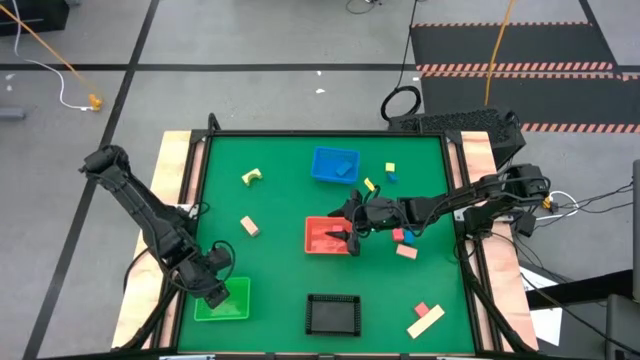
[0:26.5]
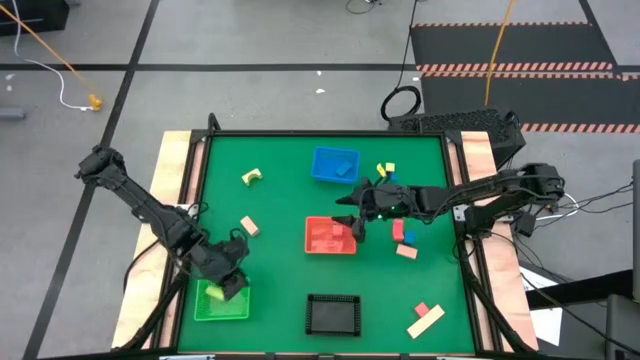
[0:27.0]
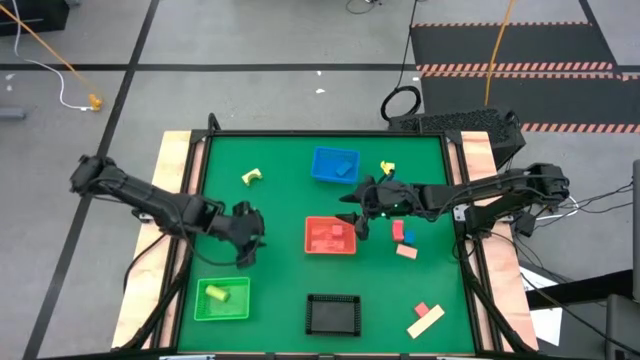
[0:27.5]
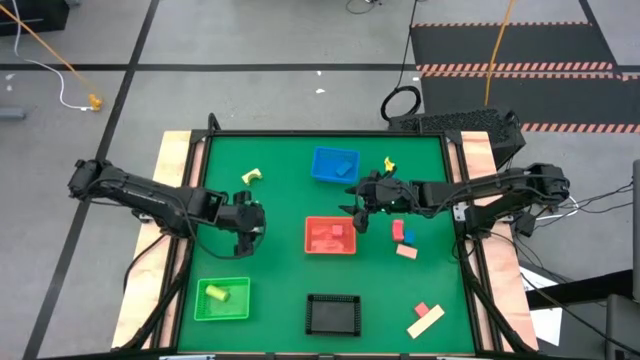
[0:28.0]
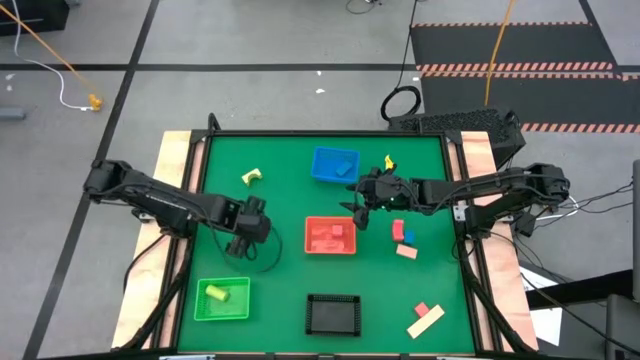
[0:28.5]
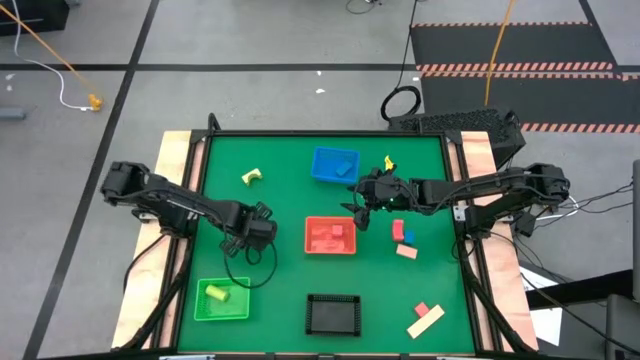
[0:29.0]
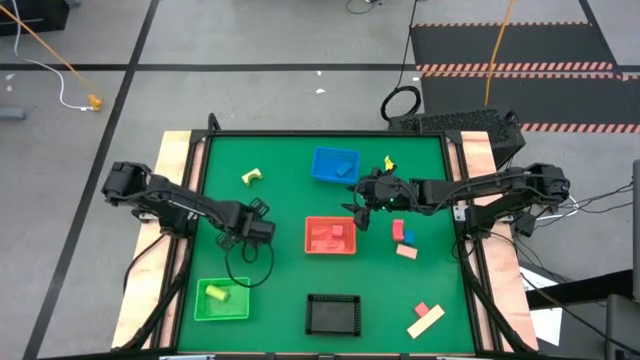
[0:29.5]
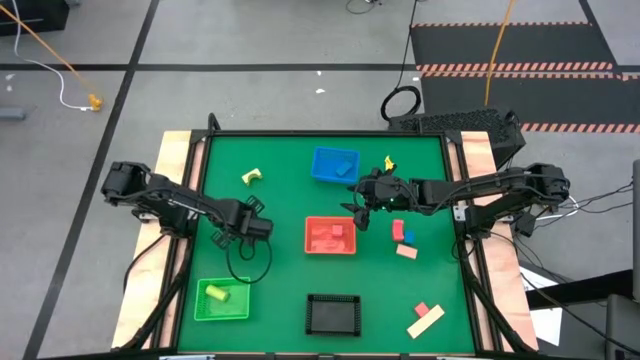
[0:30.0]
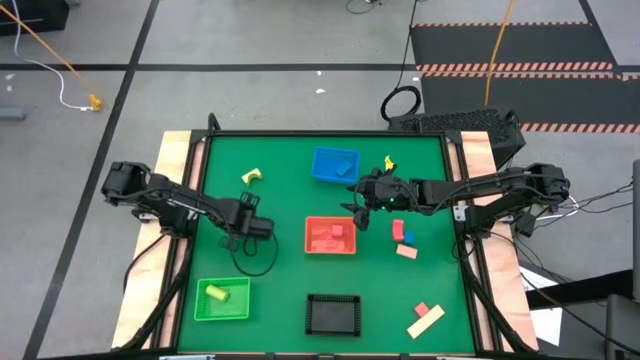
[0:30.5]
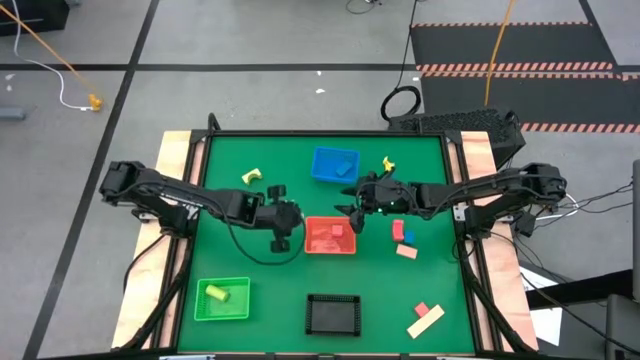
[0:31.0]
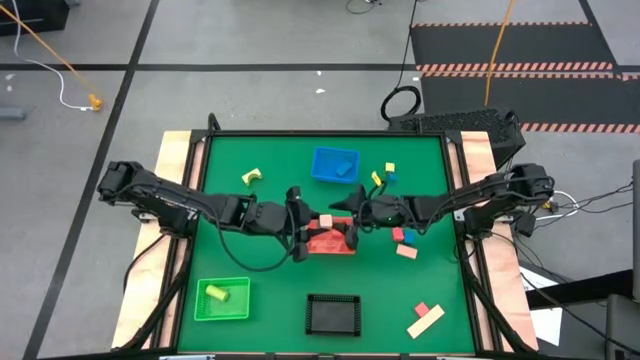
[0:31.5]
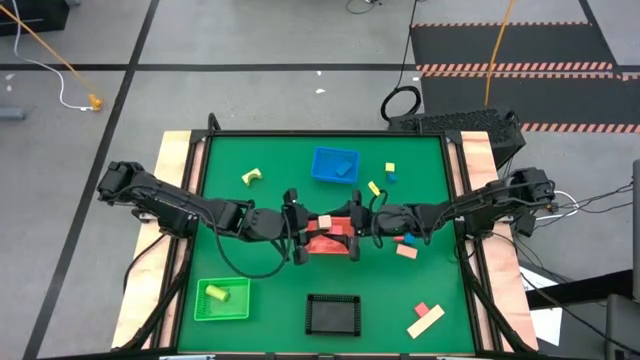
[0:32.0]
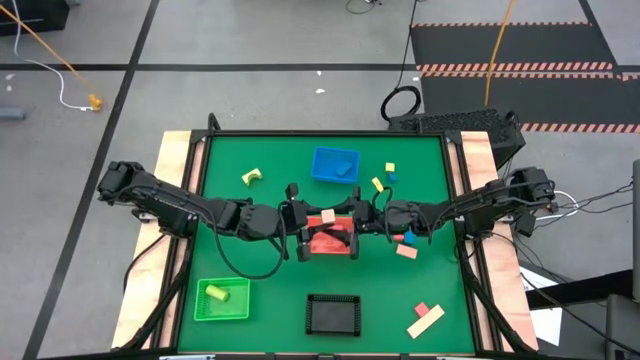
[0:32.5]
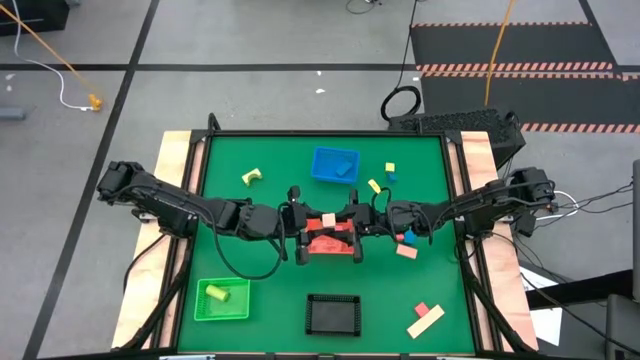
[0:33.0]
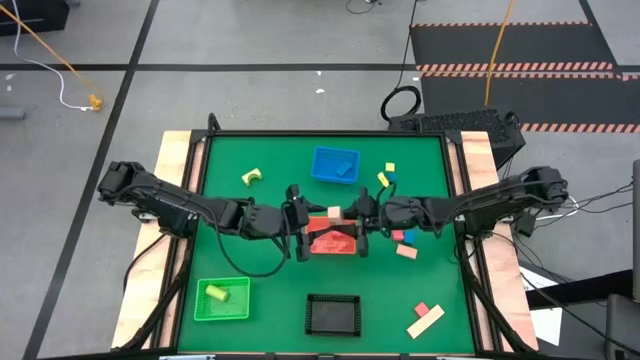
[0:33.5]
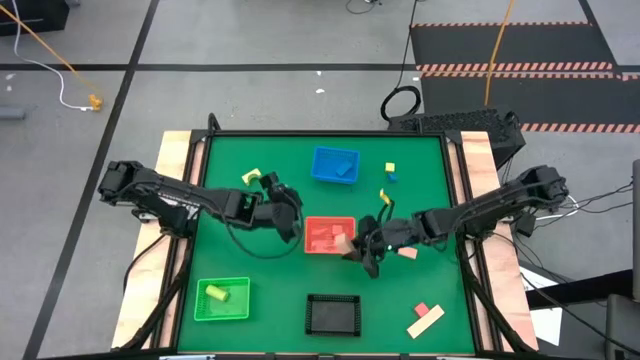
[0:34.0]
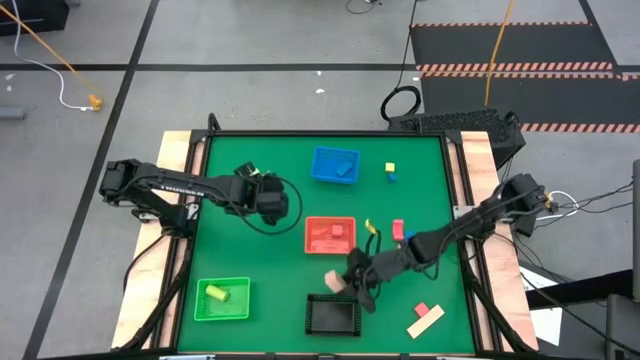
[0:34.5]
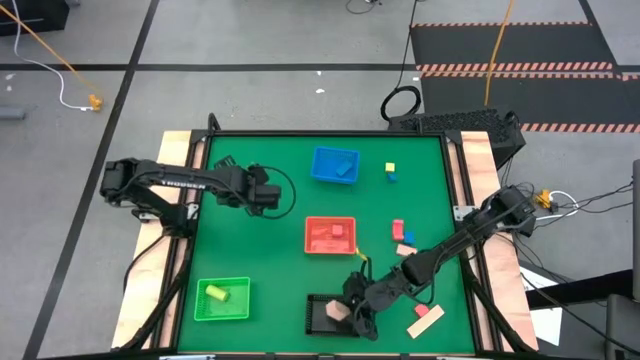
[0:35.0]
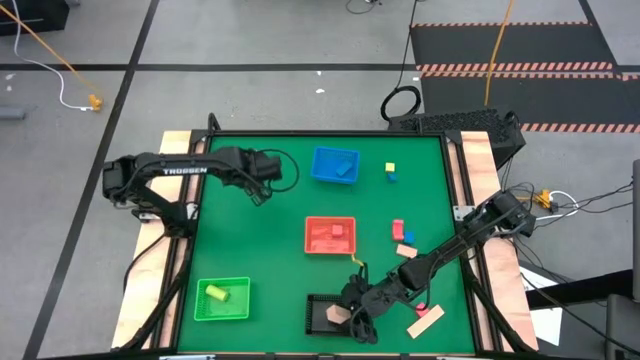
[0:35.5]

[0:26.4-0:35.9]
Task: Sort & place blocks by color
Put the top left brown block into the black bin

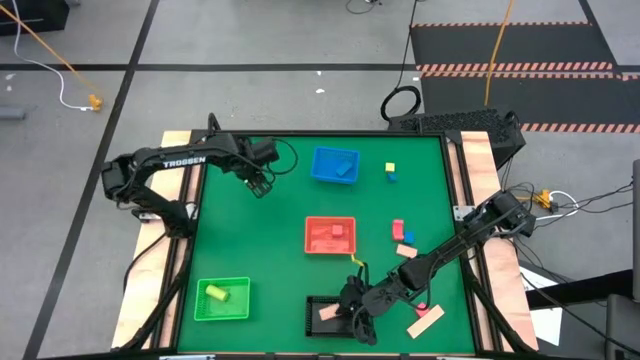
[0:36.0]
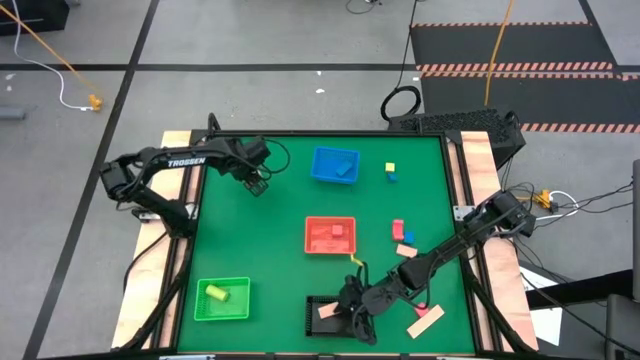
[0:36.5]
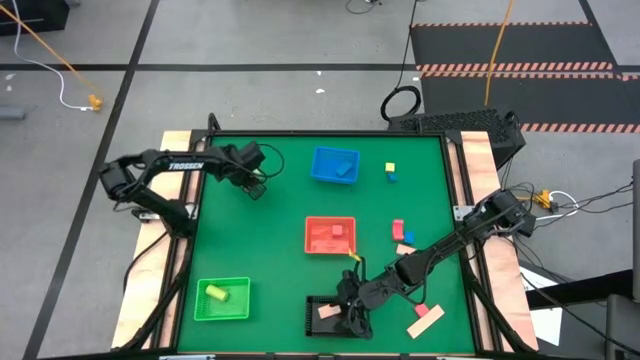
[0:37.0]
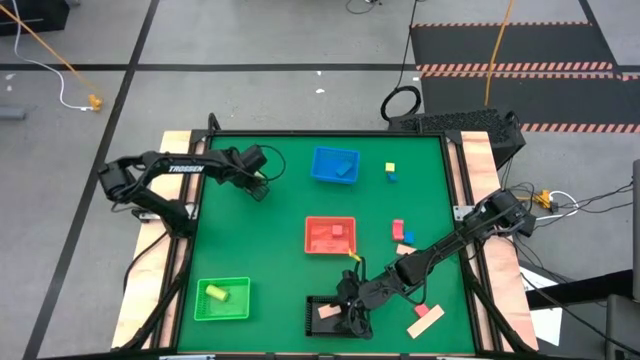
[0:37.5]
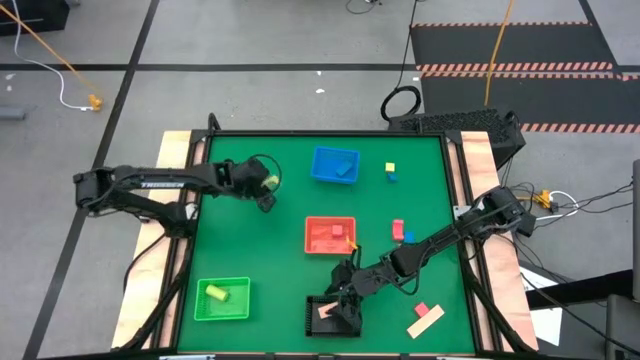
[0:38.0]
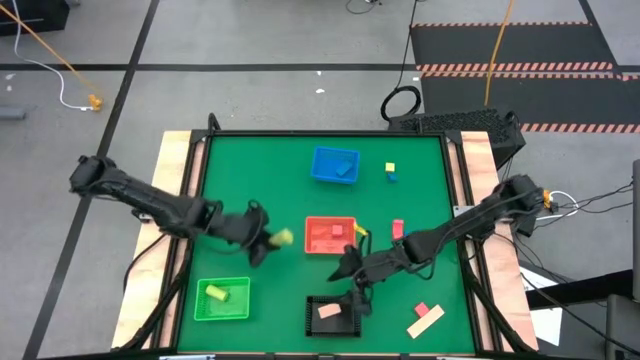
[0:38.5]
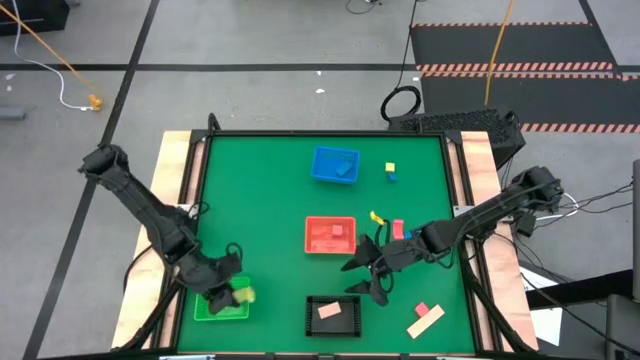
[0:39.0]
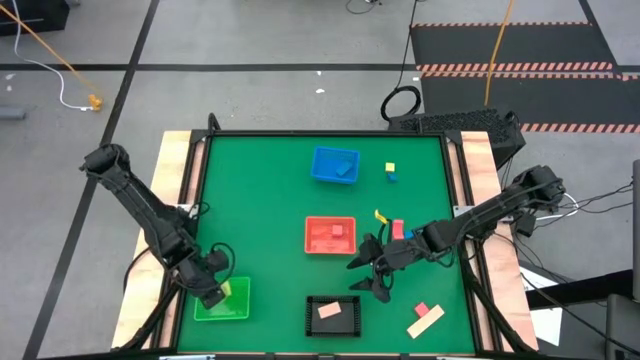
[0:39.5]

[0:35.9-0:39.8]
Put the left green block into the green bin

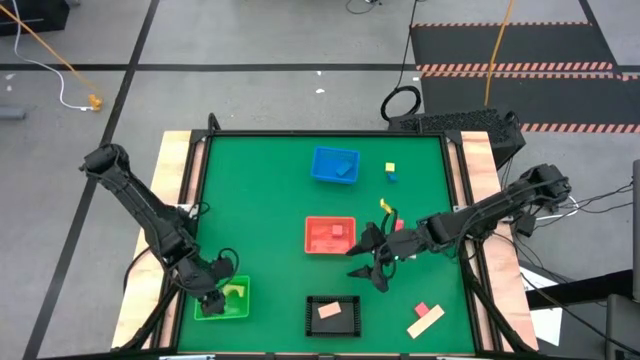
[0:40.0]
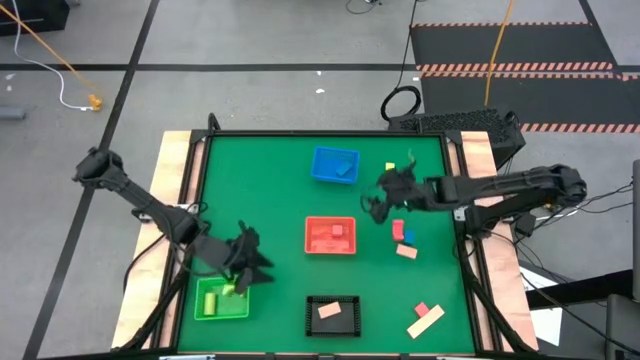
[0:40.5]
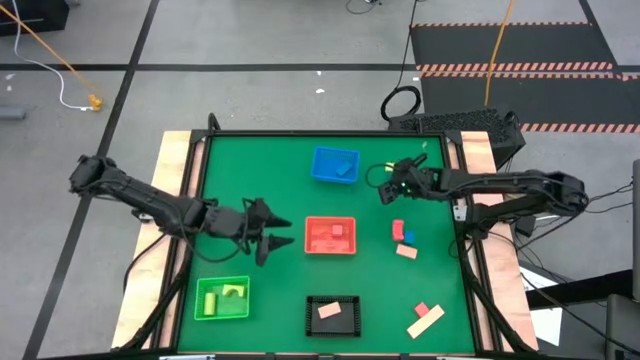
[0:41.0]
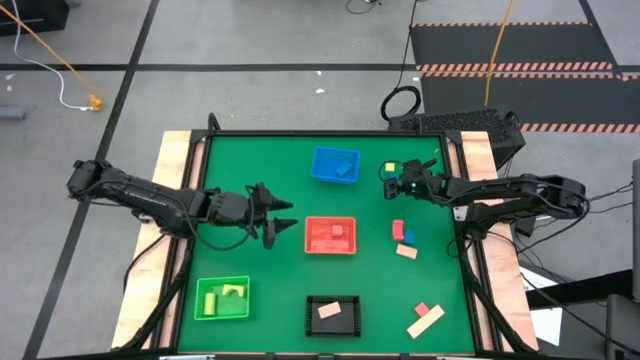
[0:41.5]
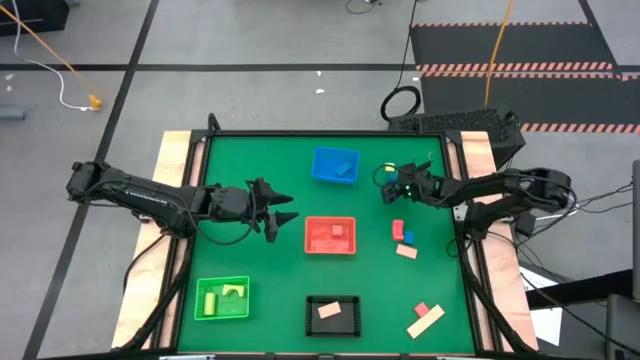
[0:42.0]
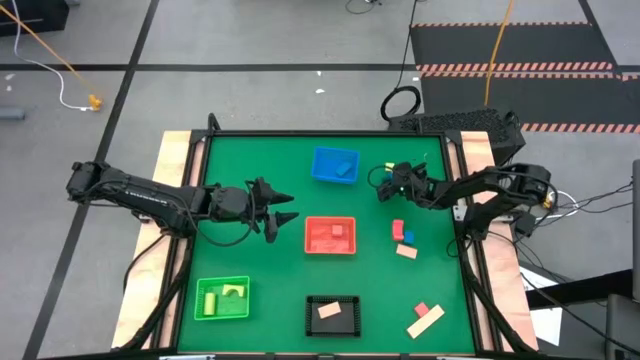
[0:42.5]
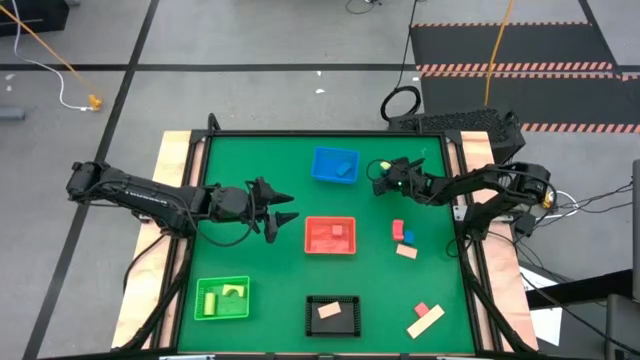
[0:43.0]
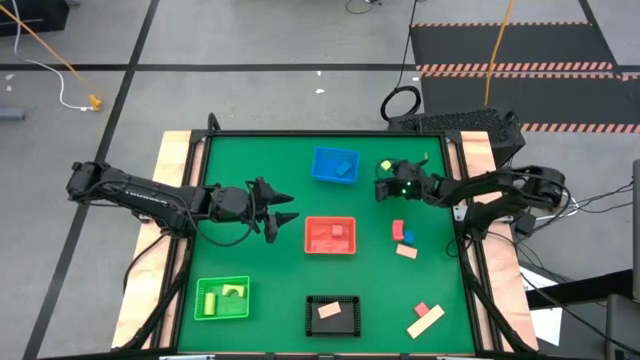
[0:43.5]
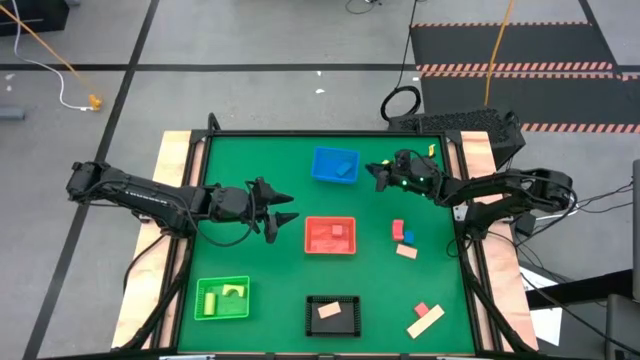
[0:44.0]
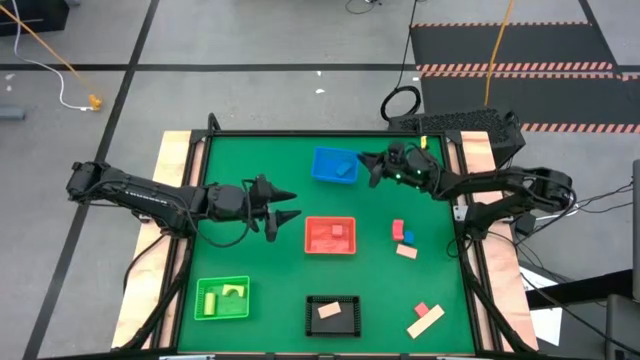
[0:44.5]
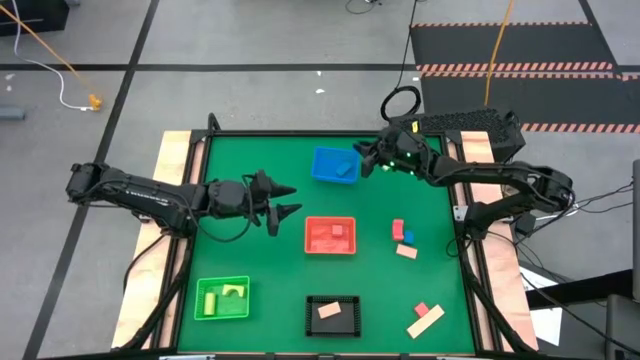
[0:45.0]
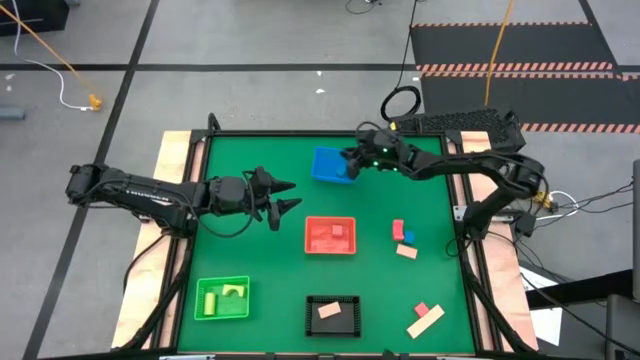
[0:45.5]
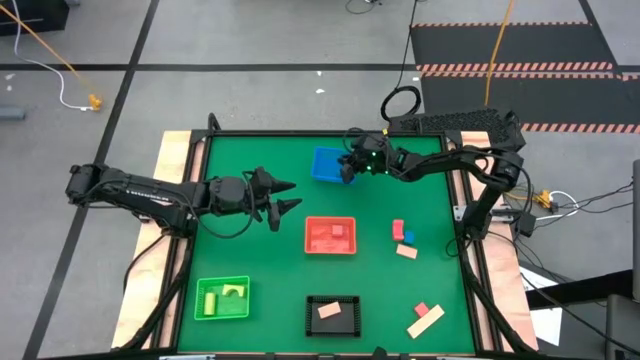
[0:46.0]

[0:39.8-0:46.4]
Put the top blue block into the blue bin

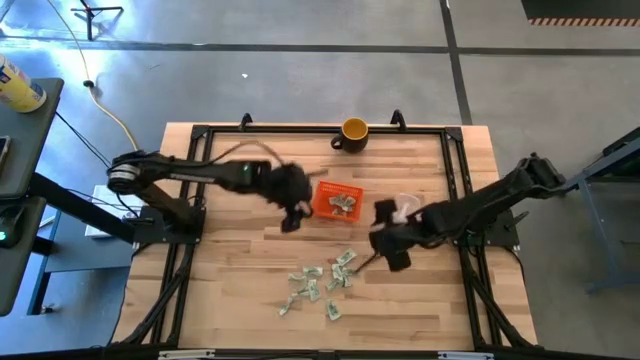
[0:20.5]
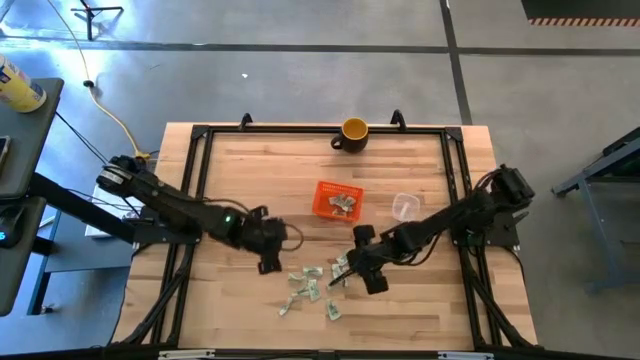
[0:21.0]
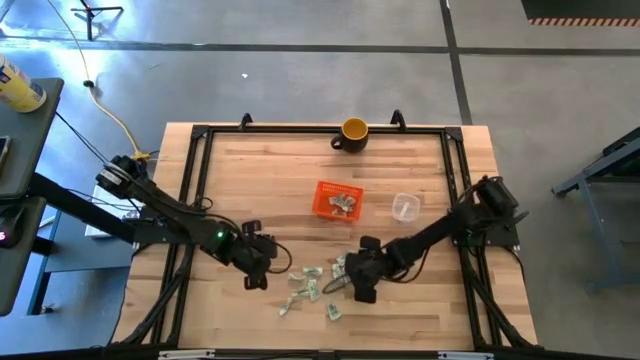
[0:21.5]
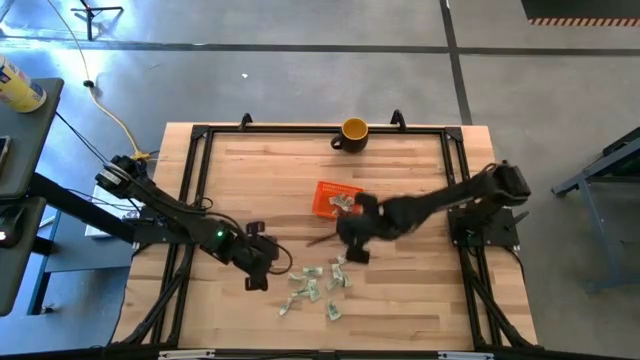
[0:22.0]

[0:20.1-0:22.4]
Task: Pick and place items into bin
Put the white stevia packet into the orange bin

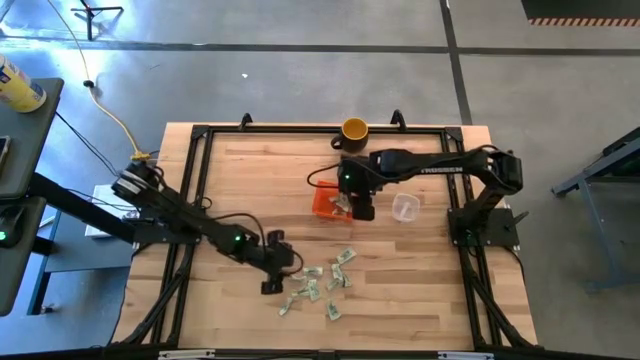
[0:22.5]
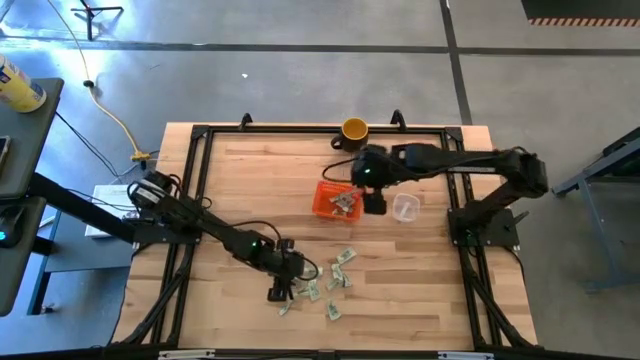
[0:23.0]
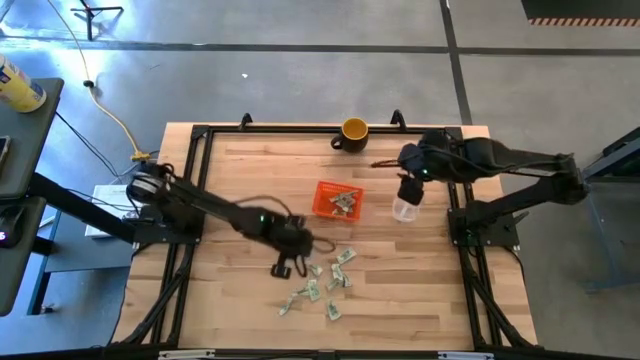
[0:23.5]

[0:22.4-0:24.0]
Put the white stevia packet into the orange bin
